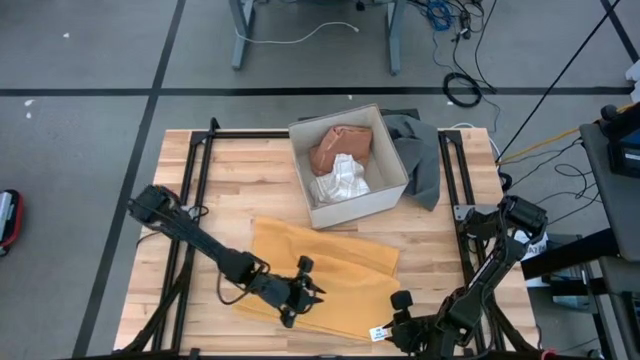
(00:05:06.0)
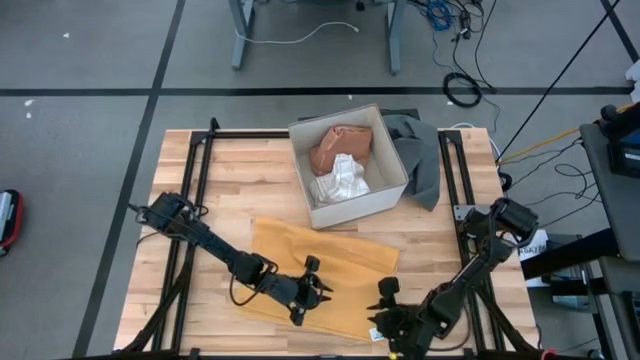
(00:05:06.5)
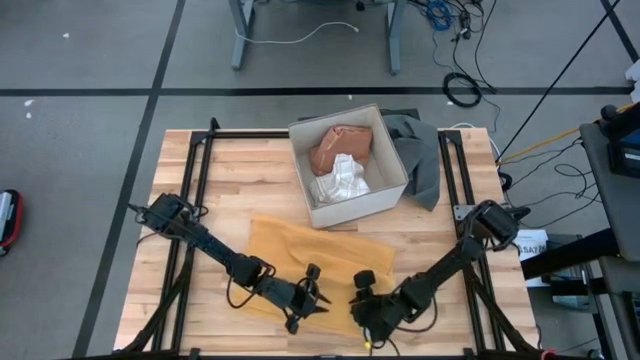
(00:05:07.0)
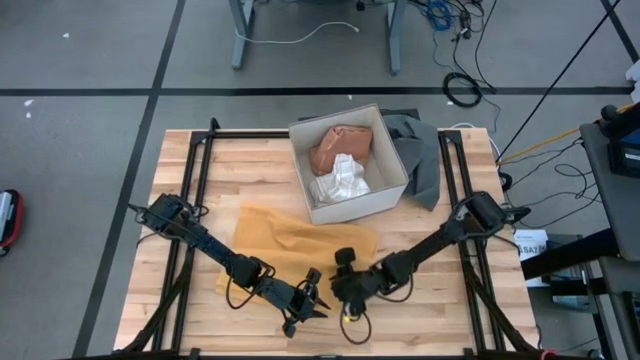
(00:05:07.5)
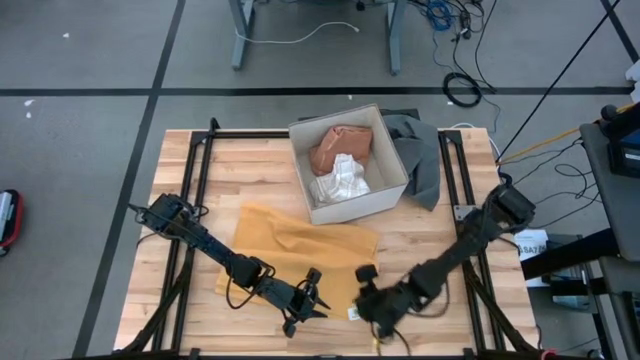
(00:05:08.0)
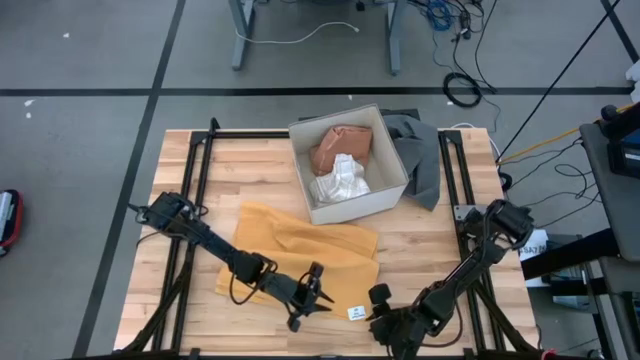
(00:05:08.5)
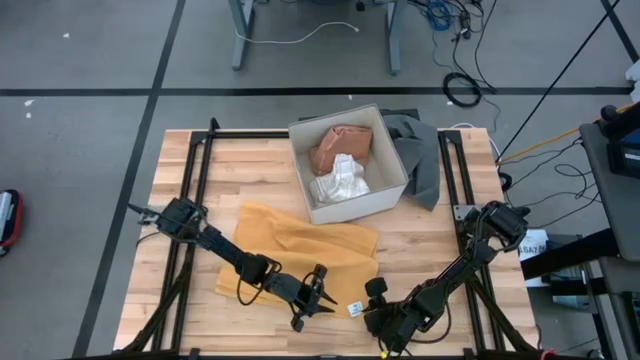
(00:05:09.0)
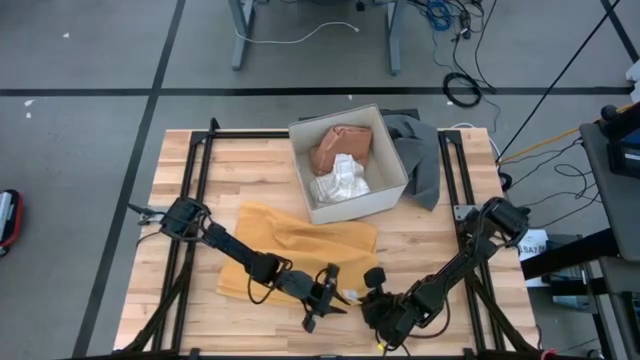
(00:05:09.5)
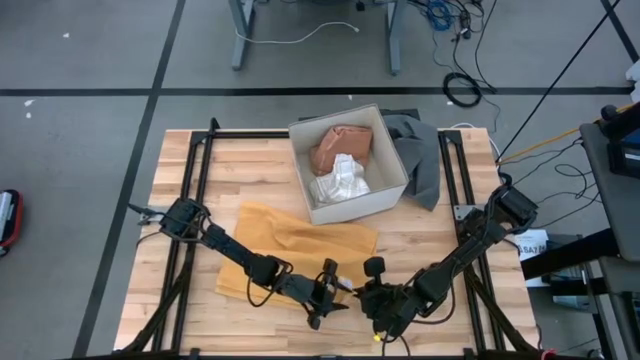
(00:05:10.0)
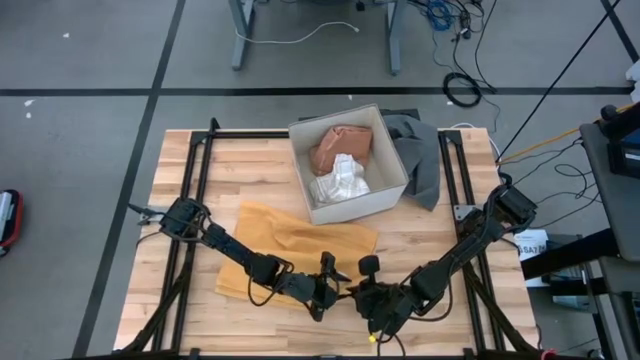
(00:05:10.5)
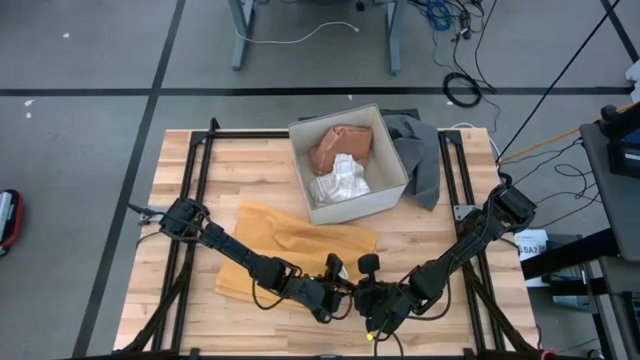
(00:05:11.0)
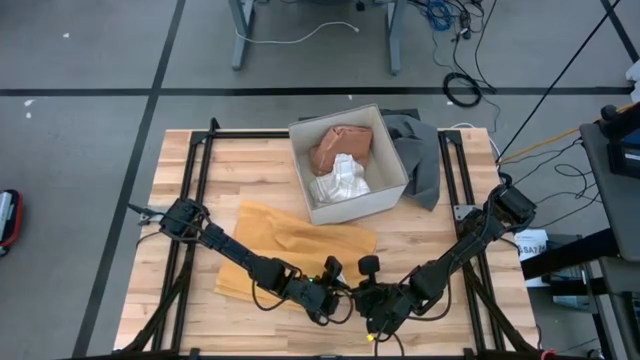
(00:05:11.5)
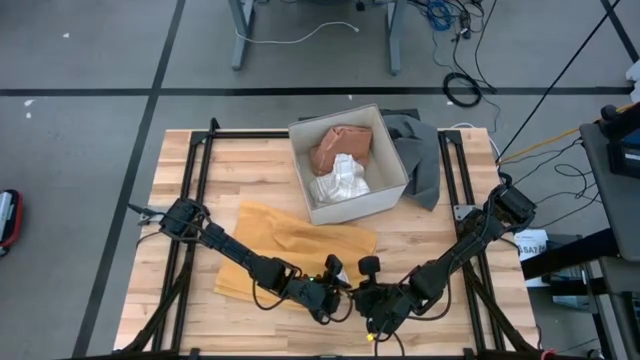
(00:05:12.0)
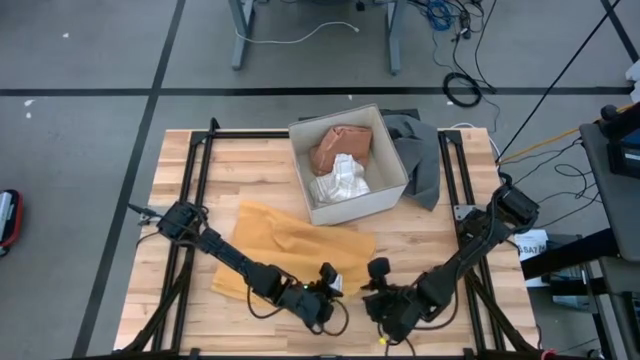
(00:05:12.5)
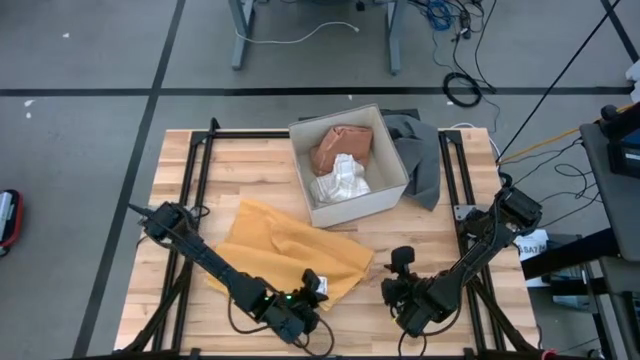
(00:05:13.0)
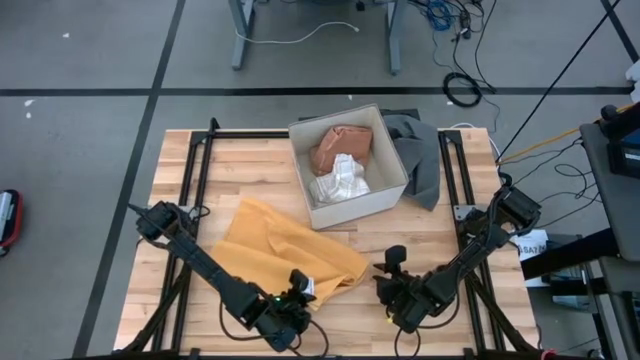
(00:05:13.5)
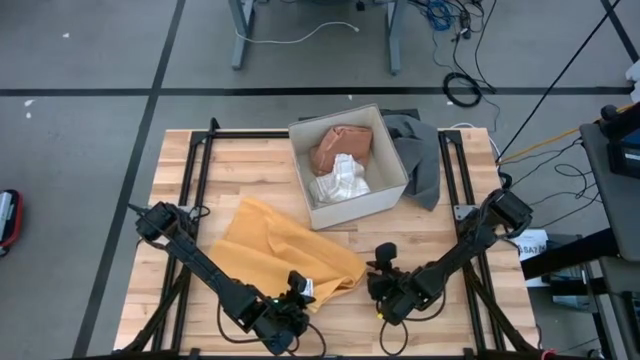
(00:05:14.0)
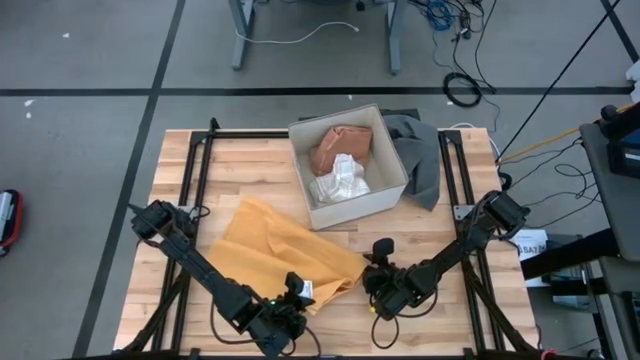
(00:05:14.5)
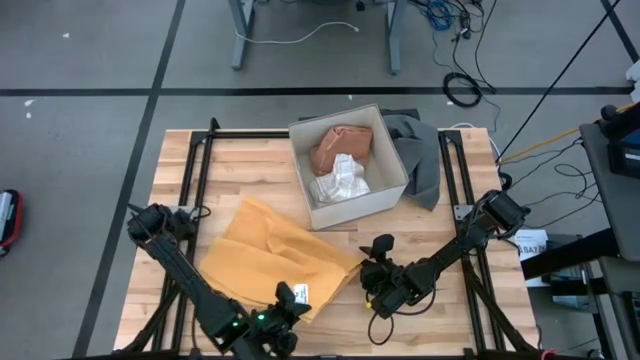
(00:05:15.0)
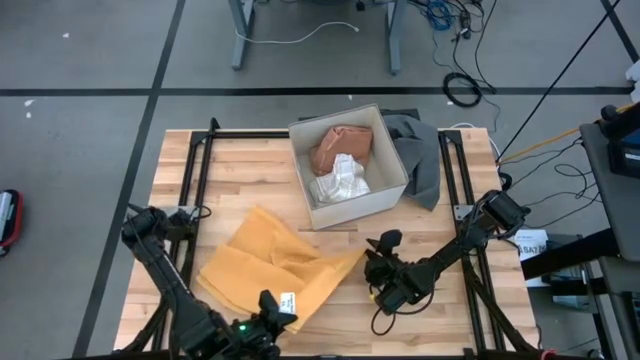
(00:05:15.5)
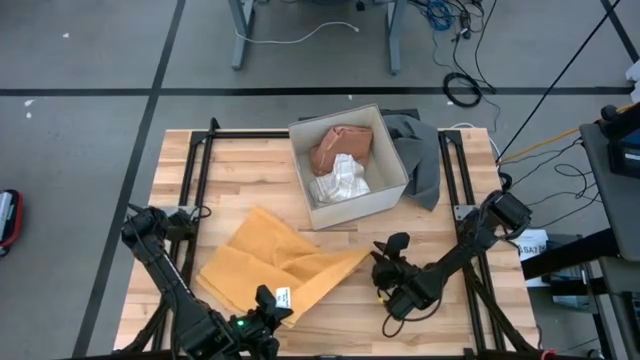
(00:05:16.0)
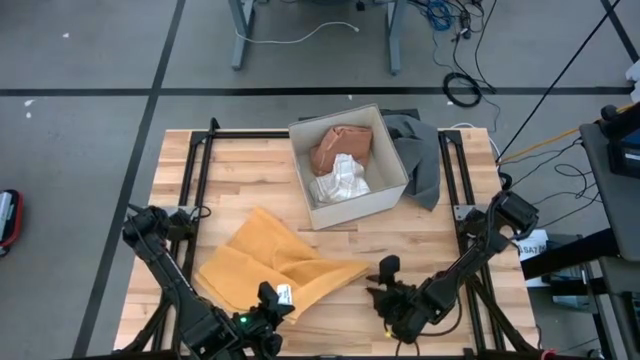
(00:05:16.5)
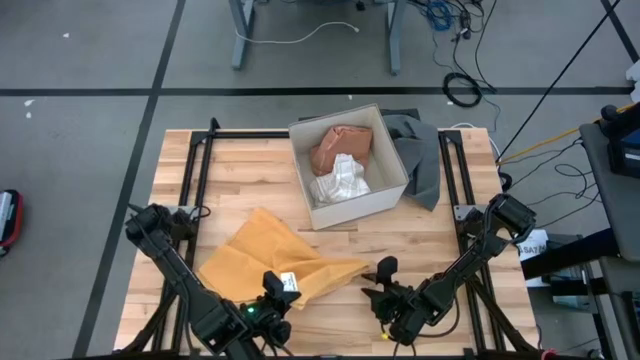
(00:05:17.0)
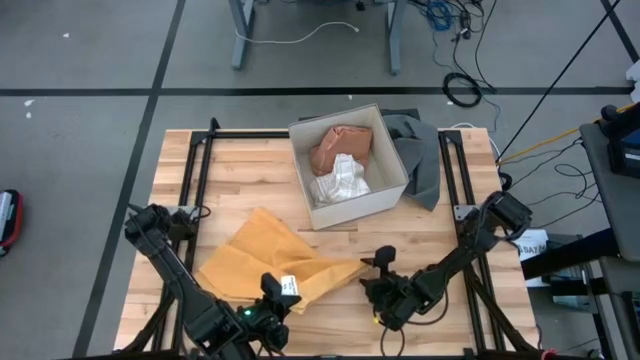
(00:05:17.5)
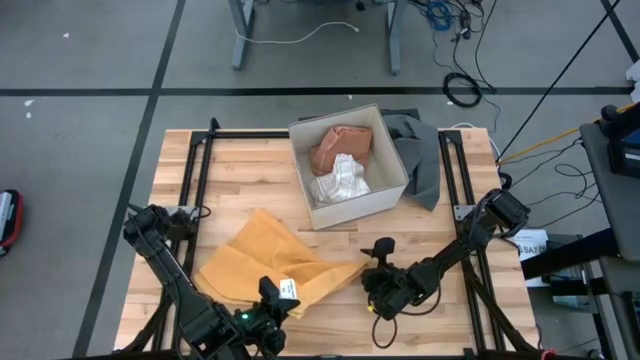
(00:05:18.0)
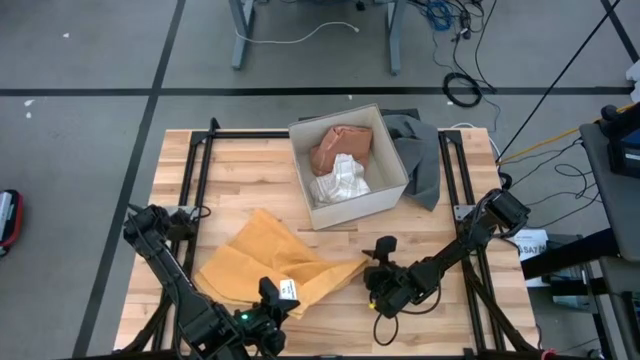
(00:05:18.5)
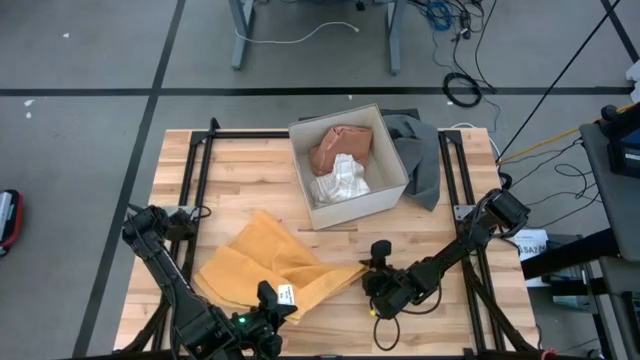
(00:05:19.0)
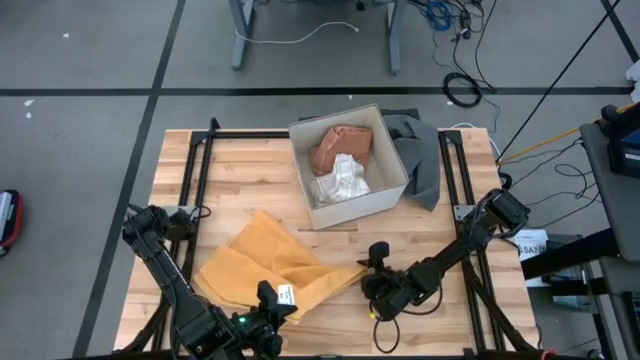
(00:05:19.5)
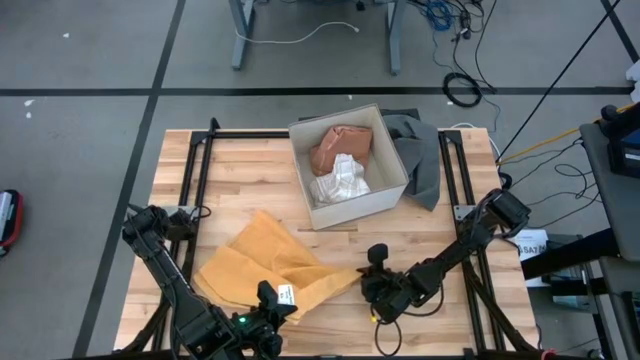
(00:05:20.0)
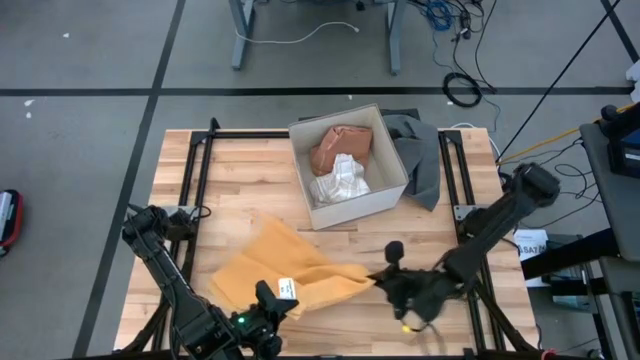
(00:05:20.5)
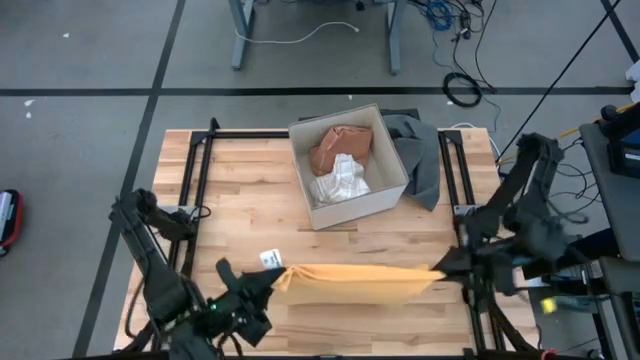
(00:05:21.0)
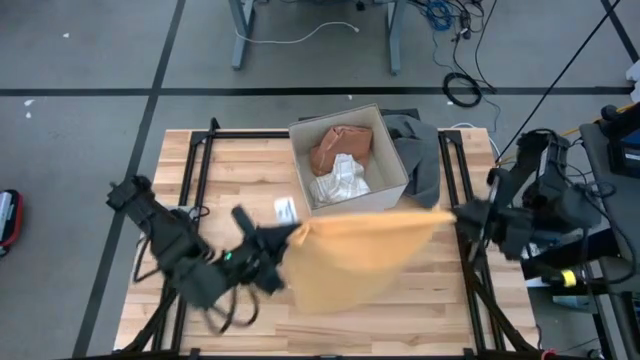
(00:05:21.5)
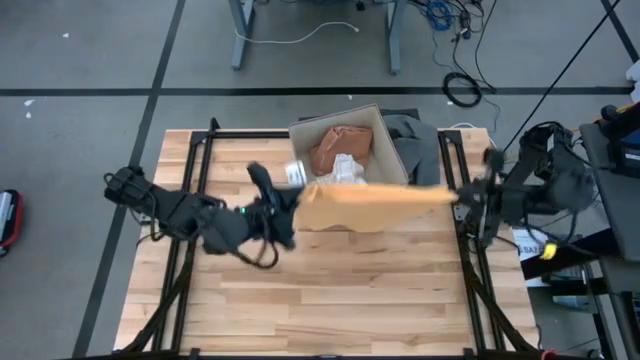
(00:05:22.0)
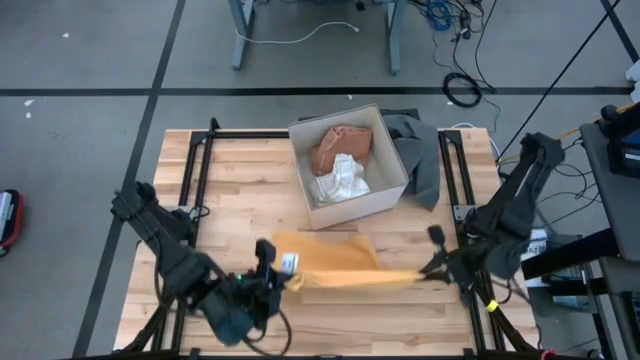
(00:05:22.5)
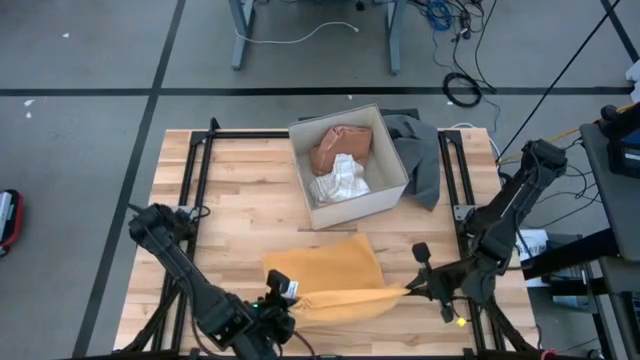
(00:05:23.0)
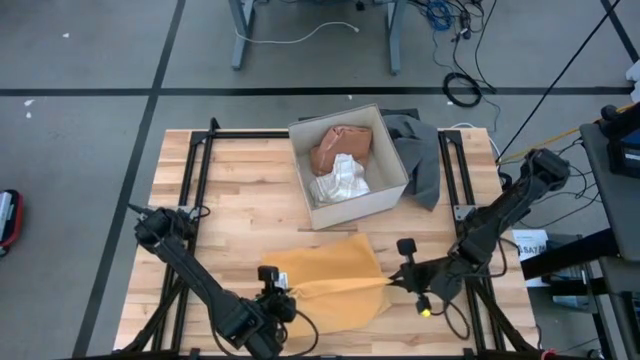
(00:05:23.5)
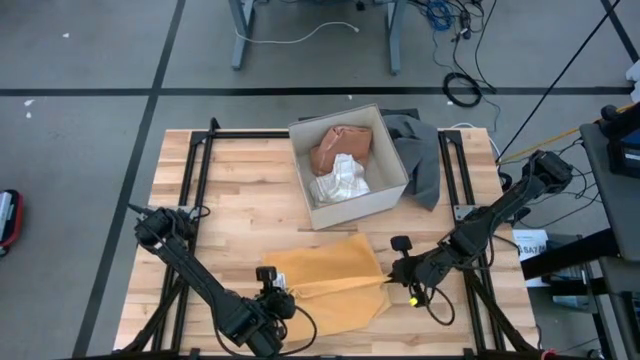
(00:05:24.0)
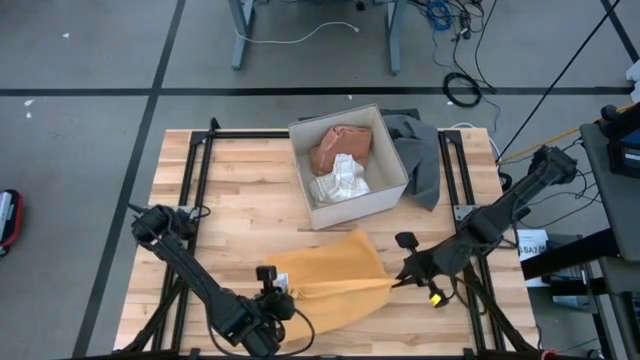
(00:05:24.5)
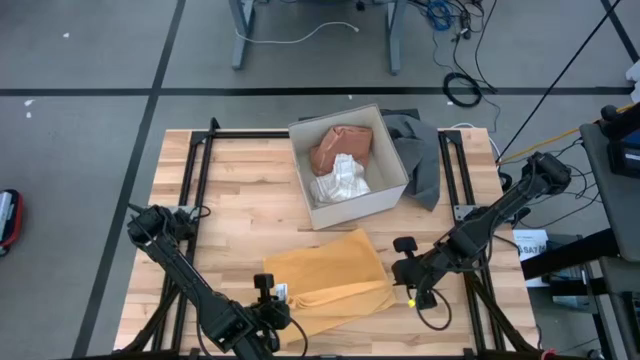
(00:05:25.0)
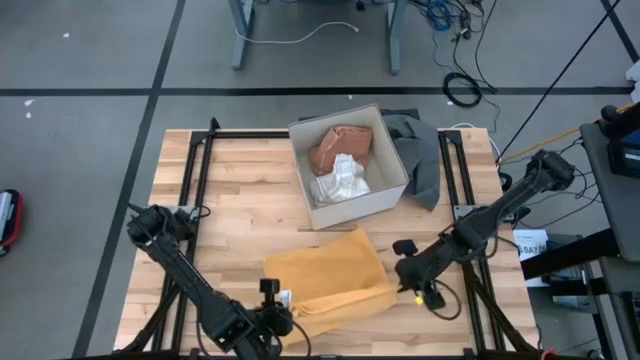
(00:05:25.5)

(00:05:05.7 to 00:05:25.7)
Task: Fold towel
Fold the orange towel
